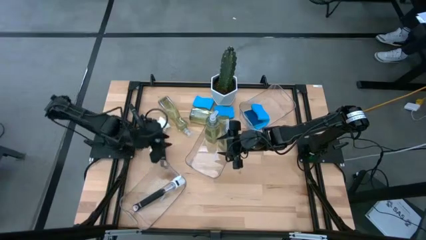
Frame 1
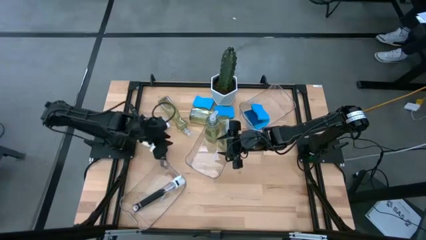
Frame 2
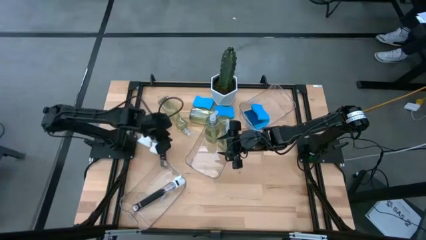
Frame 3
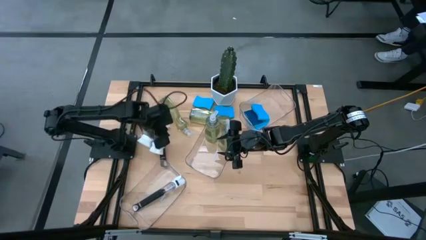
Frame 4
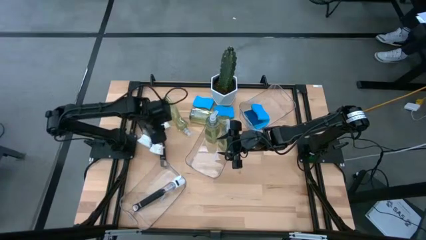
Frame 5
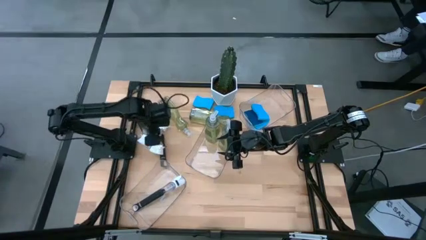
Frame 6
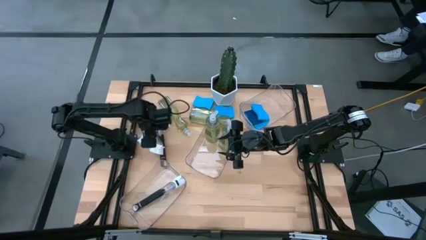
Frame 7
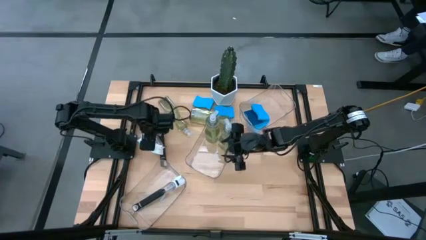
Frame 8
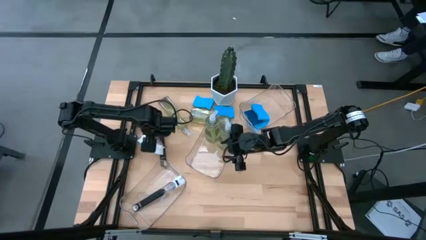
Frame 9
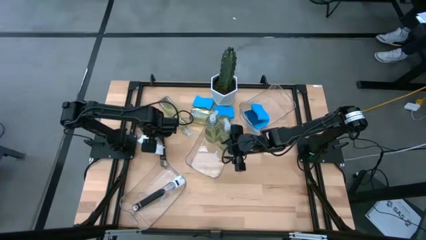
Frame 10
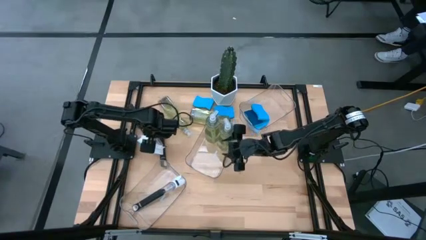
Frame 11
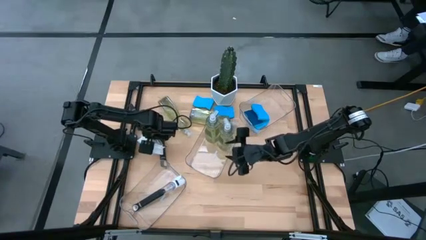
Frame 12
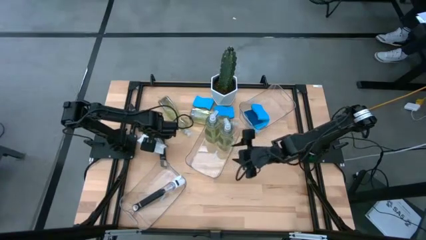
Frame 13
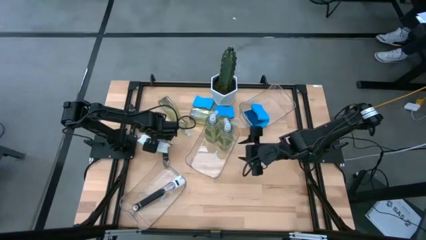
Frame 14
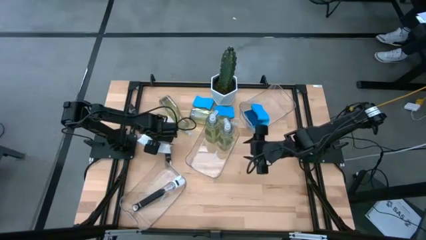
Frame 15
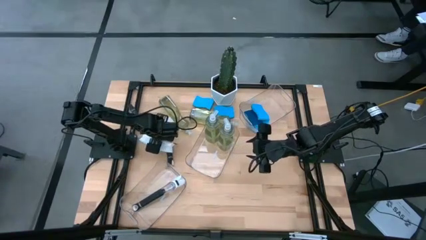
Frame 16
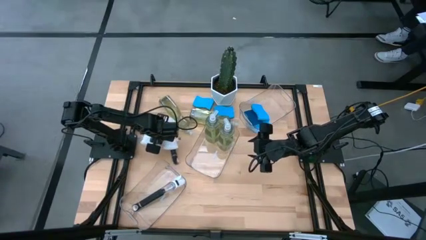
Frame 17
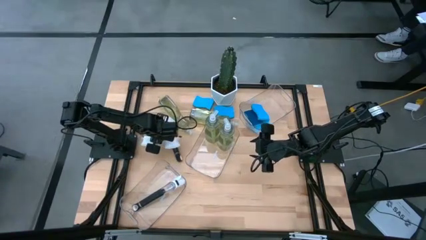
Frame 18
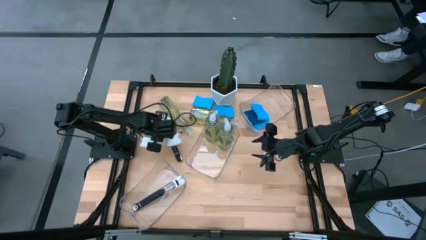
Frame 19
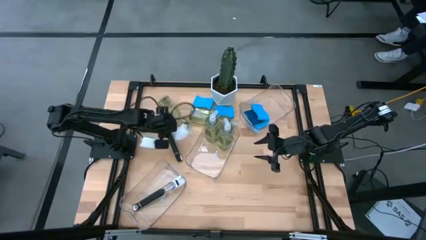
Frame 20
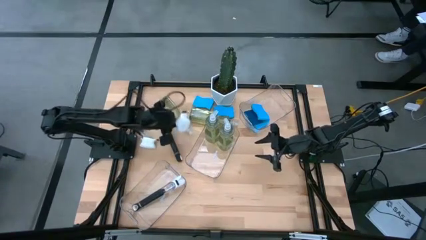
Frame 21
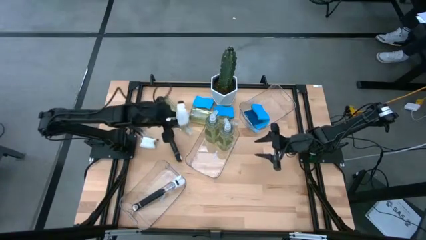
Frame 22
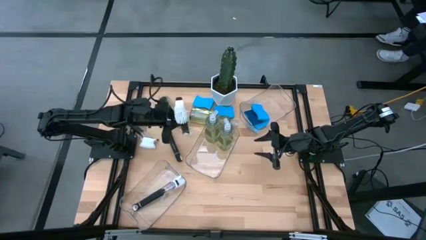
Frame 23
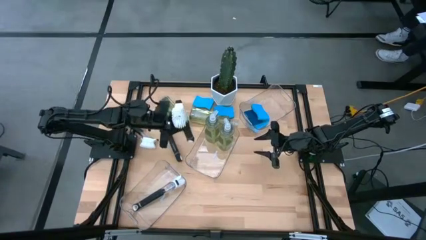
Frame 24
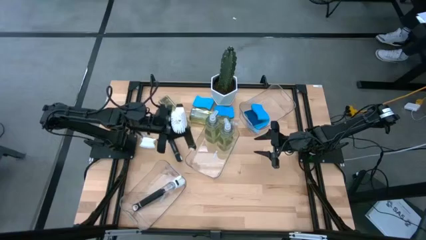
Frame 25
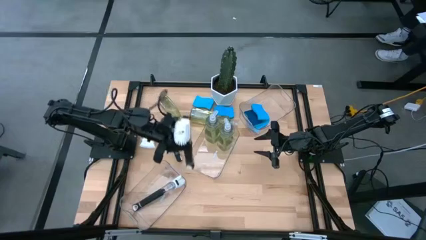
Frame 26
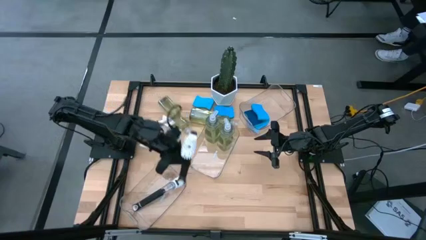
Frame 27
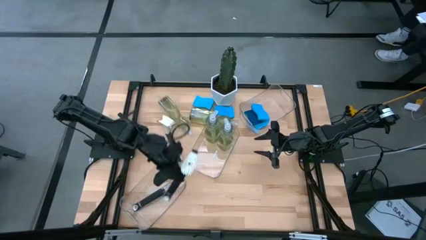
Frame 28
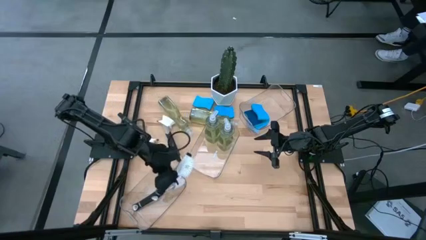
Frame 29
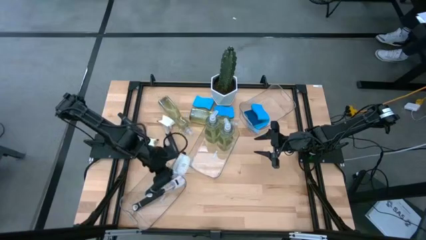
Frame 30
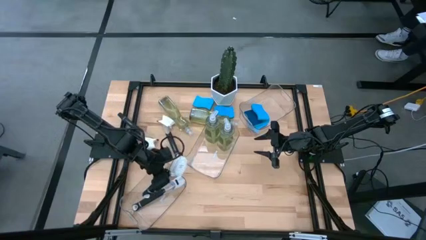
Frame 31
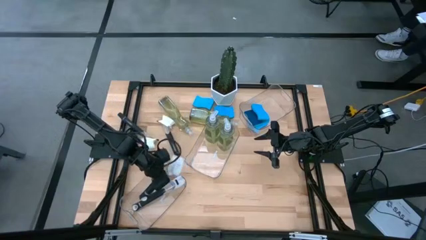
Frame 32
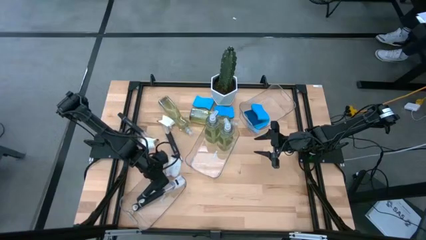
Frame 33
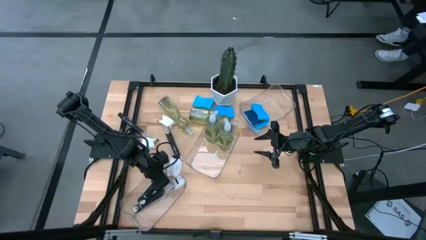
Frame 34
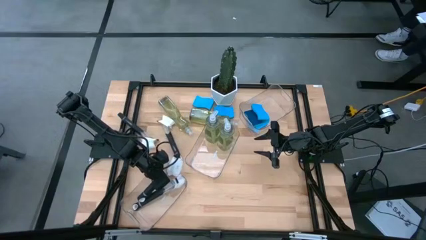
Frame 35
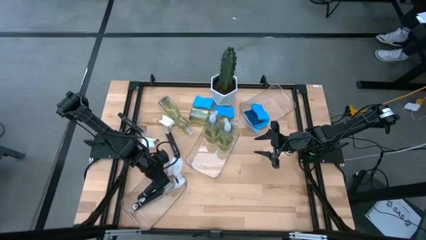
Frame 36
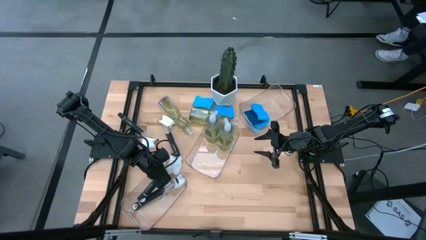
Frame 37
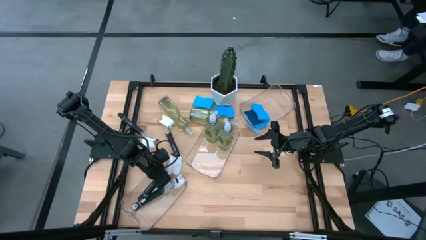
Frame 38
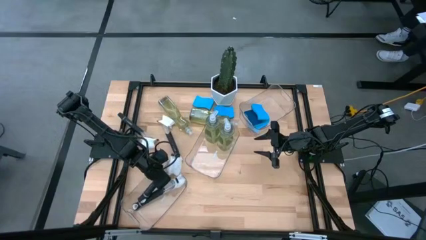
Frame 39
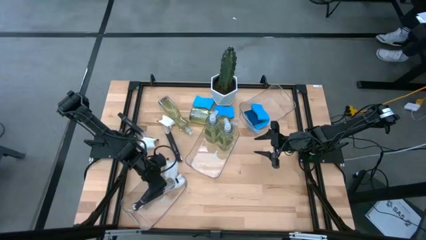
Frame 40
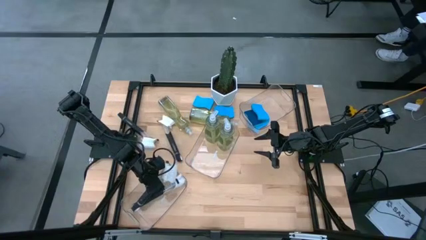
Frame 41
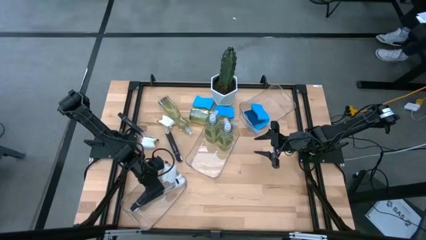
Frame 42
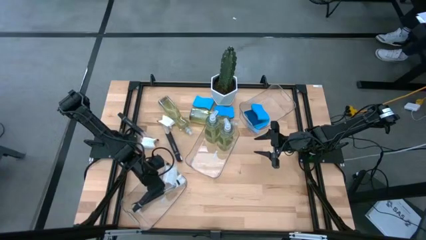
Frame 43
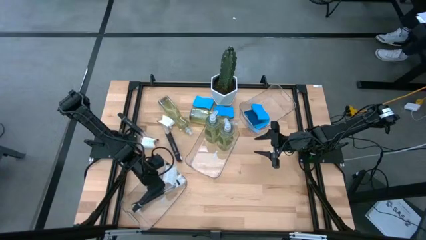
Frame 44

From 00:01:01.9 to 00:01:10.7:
Task: Pick & Place Kitchen Sink Supplies
Put the black dish brush into the bottom transparent bin

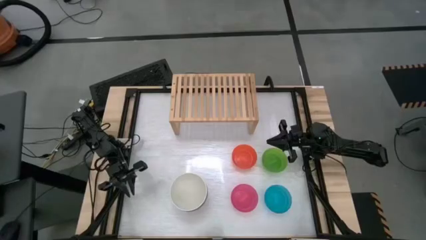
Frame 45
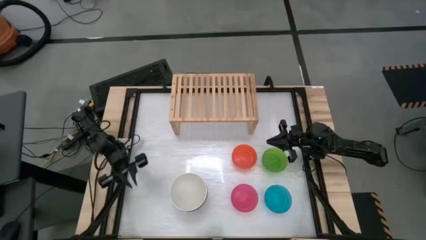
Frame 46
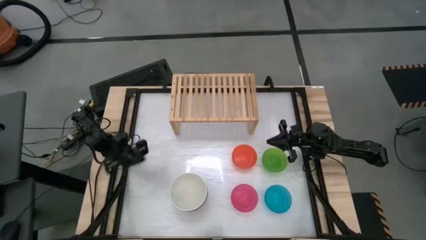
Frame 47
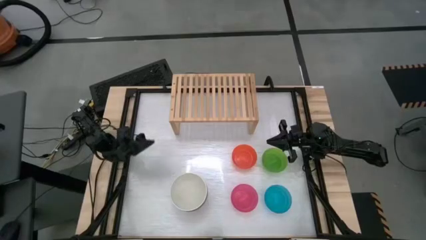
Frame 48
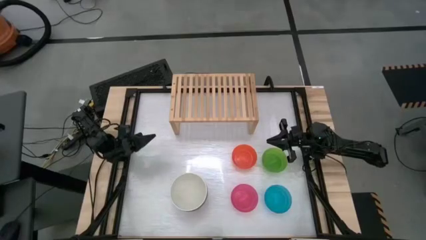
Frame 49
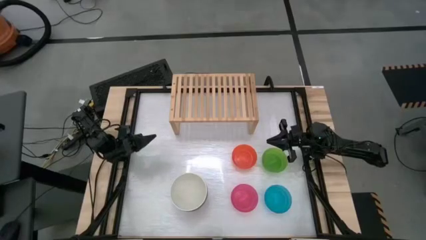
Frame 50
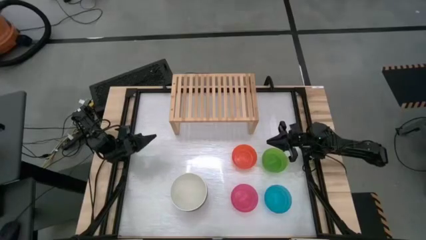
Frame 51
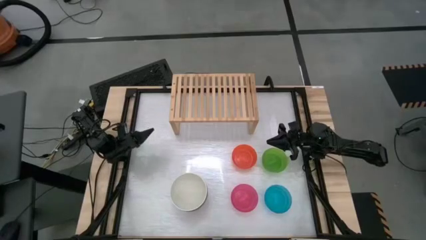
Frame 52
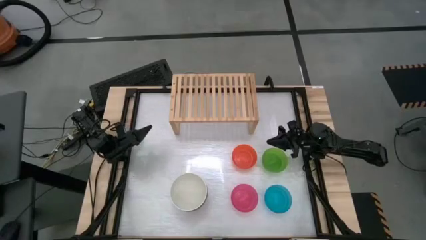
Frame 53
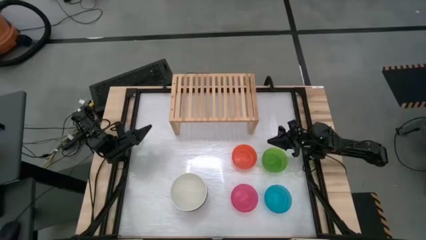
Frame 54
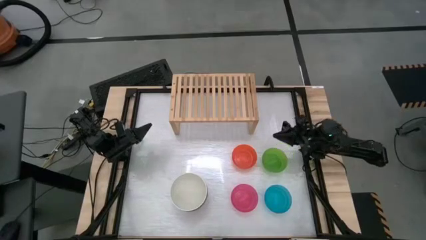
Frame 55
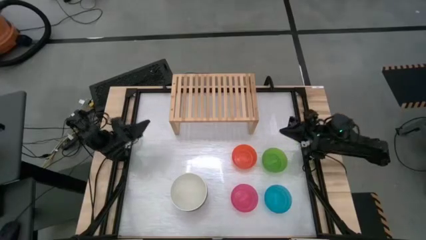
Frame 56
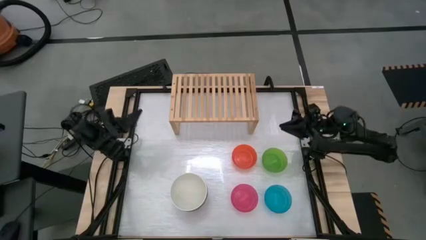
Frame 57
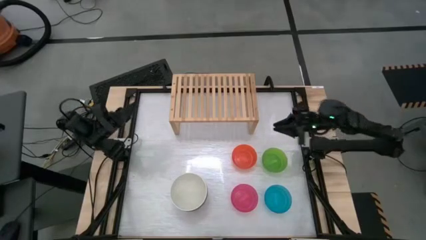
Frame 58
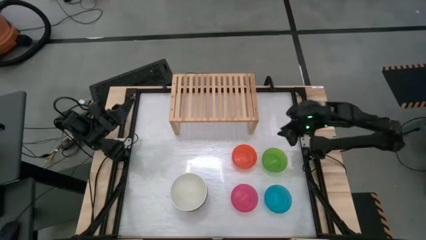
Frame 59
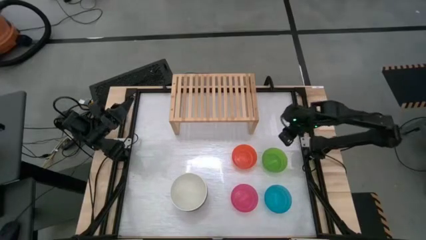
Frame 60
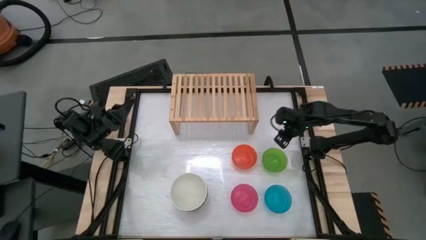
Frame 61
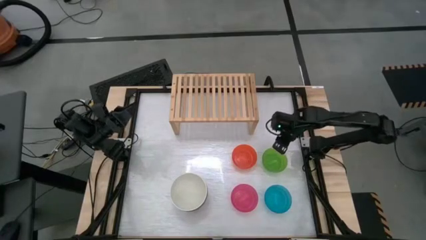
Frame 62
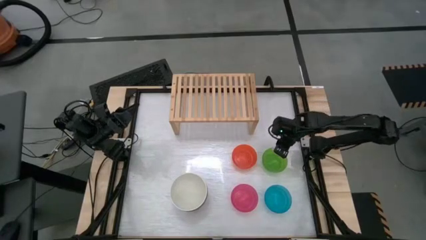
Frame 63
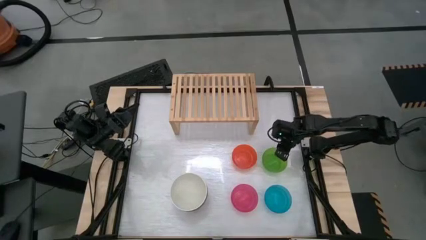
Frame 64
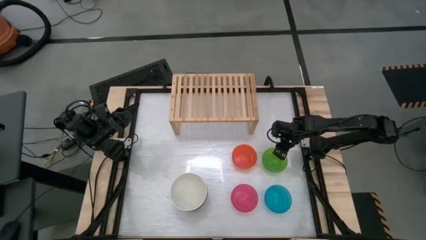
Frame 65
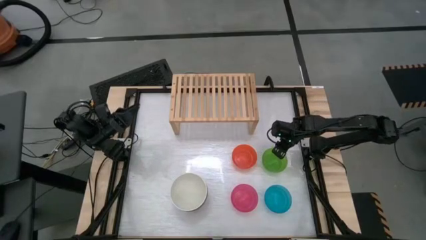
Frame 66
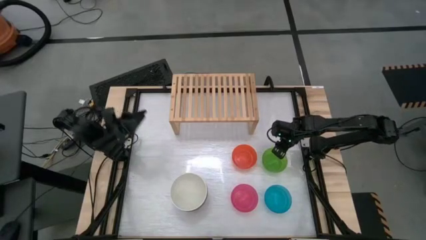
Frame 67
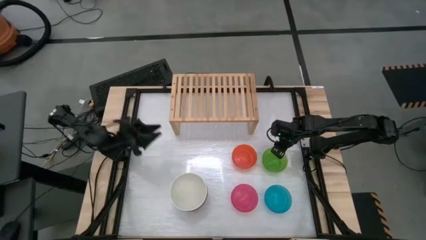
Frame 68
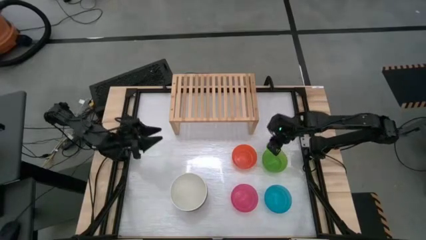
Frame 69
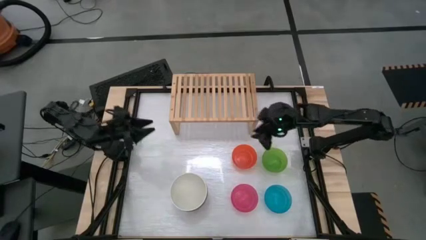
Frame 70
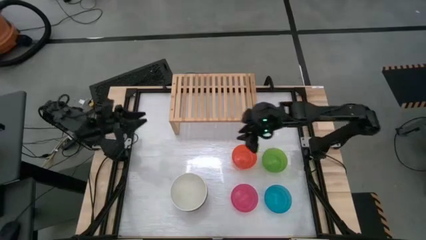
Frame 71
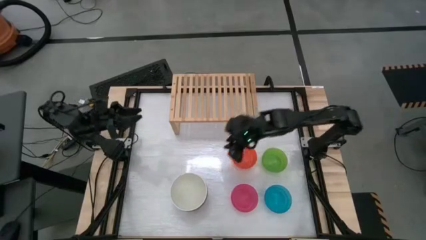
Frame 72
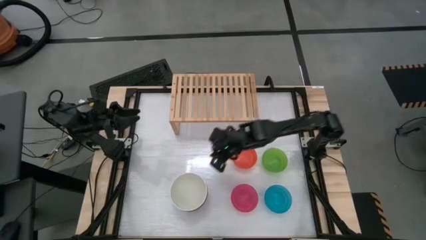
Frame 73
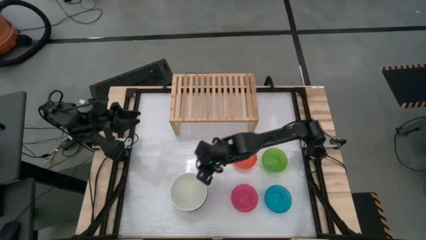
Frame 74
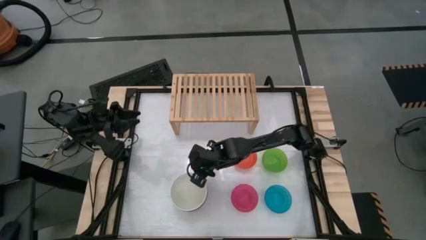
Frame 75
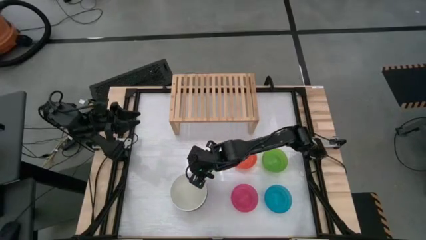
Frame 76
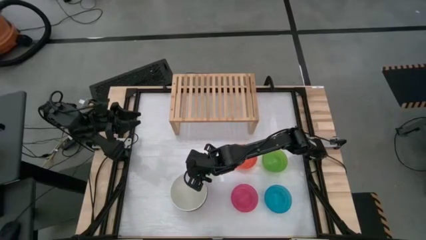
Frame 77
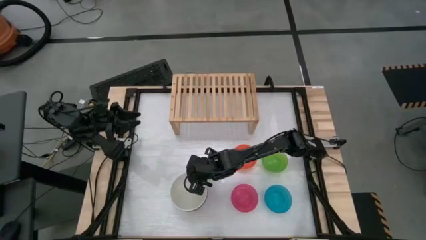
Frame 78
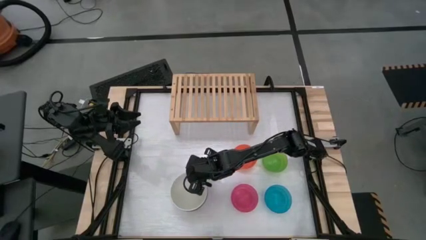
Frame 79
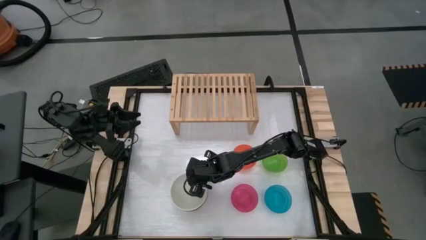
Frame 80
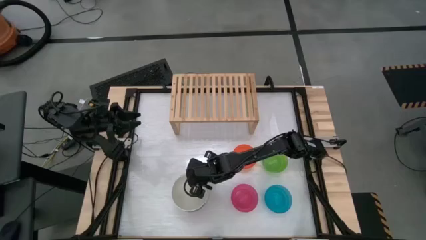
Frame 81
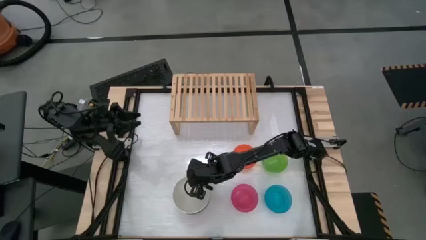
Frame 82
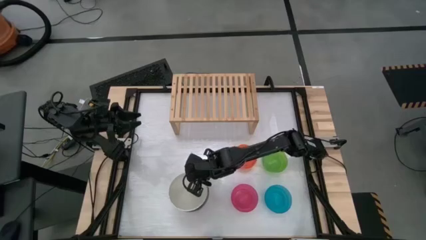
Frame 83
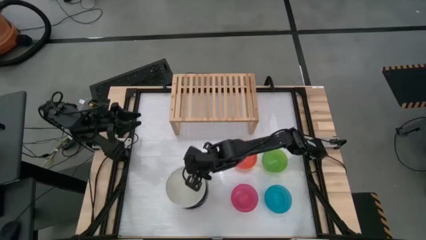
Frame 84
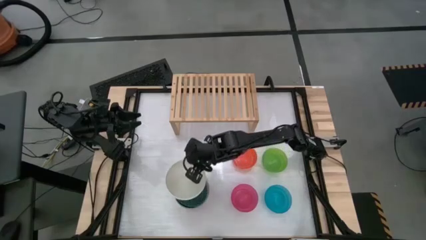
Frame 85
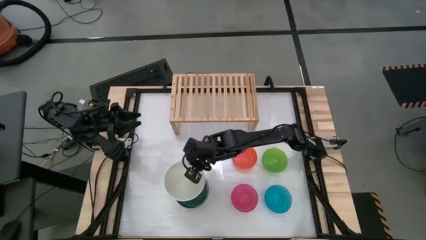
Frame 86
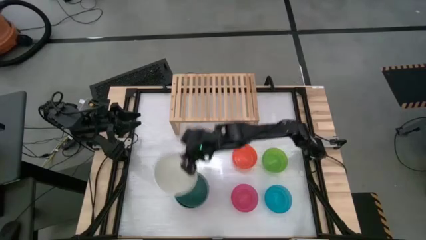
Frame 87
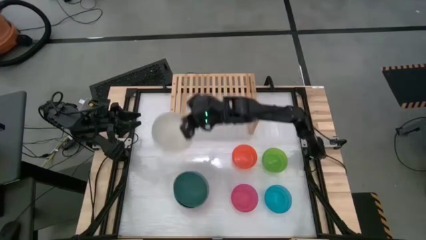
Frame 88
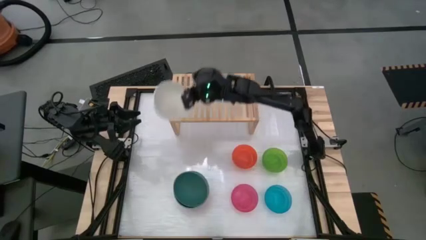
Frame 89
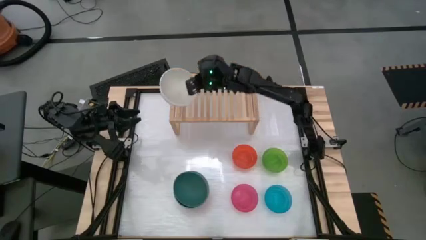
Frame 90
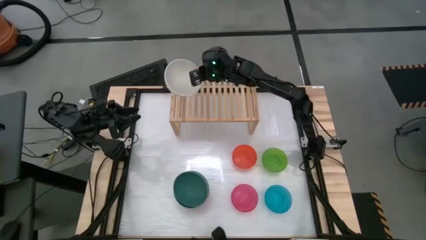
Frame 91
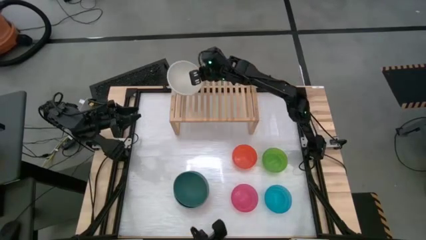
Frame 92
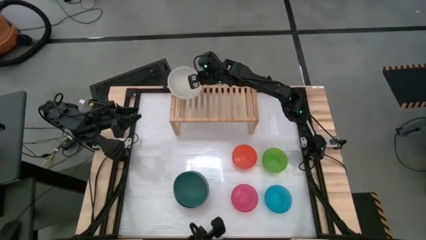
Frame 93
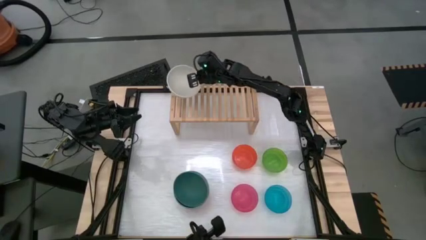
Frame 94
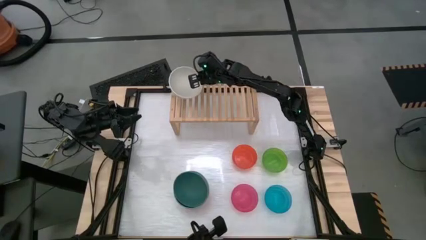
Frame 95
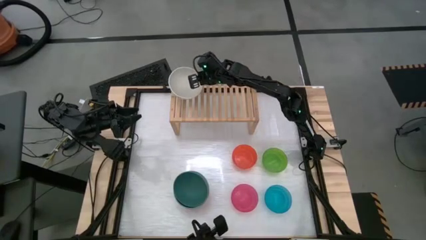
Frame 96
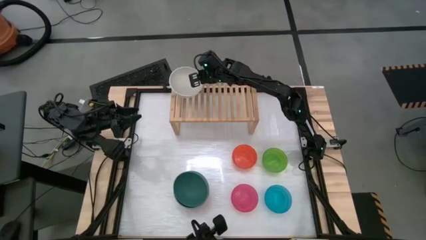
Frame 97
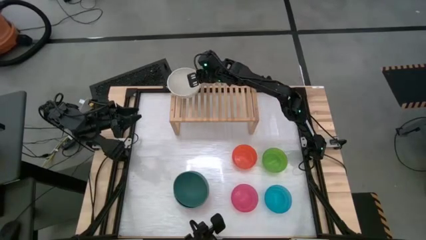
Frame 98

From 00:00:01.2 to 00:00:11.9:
Task: Place and stack bowls onto a shelf
Put the large white bowl on the shelf
